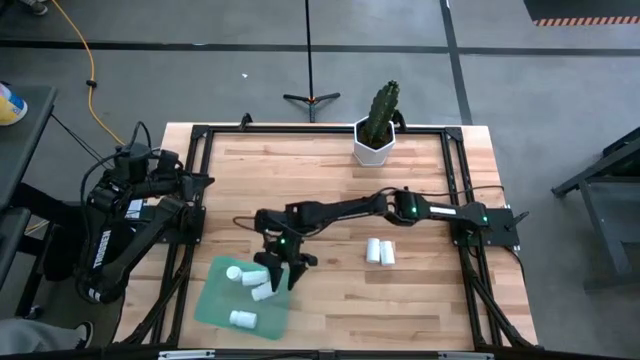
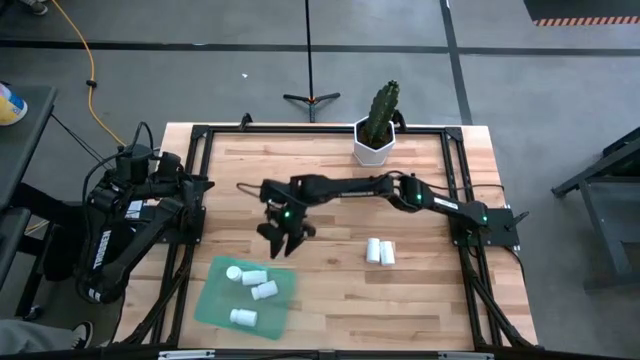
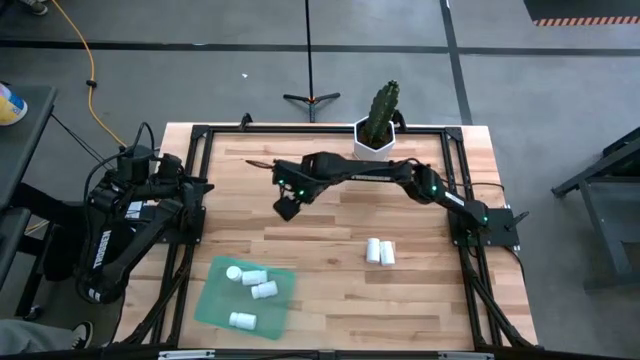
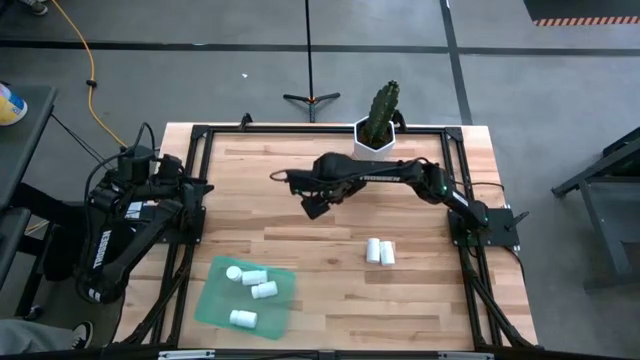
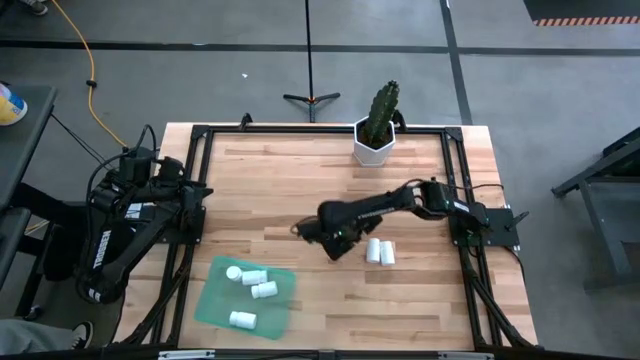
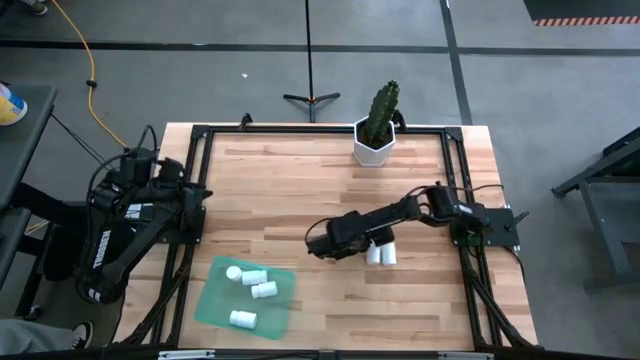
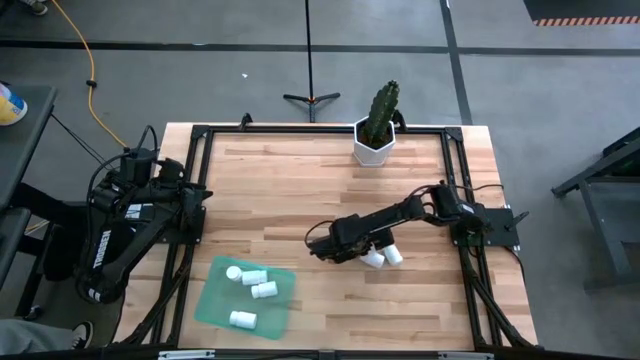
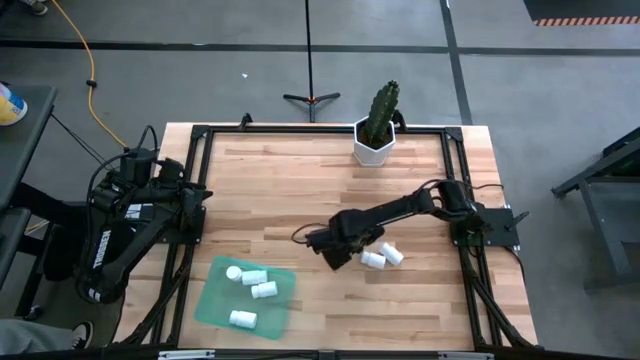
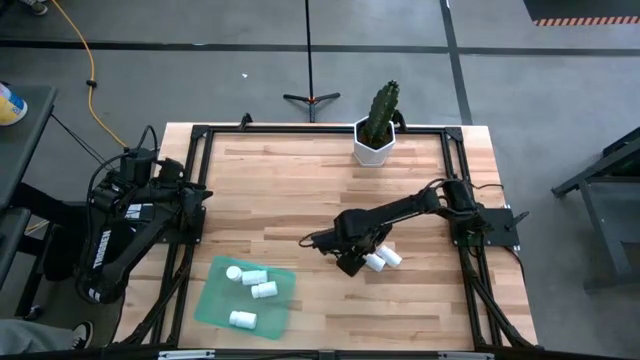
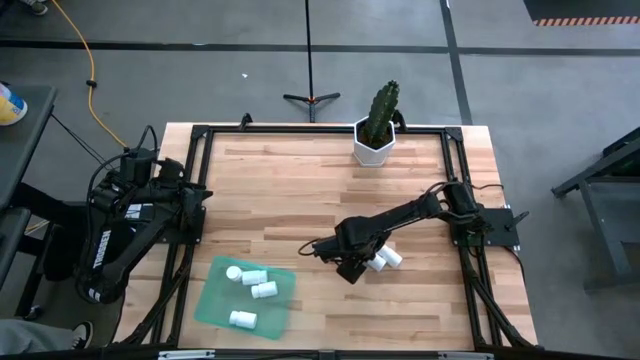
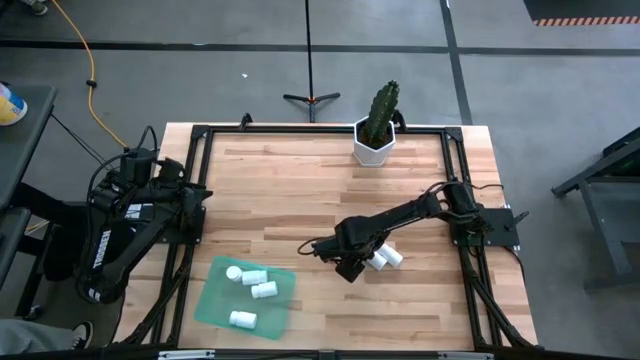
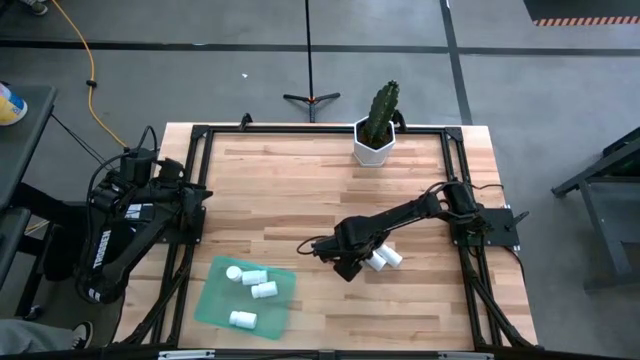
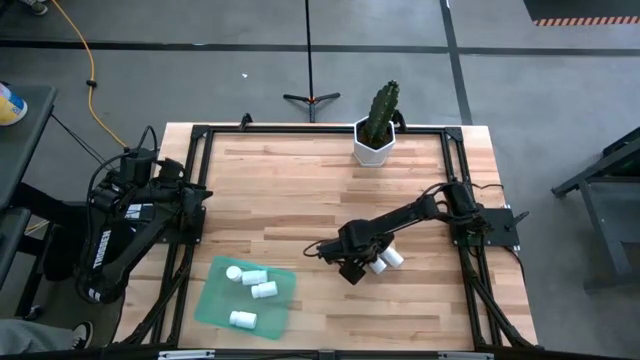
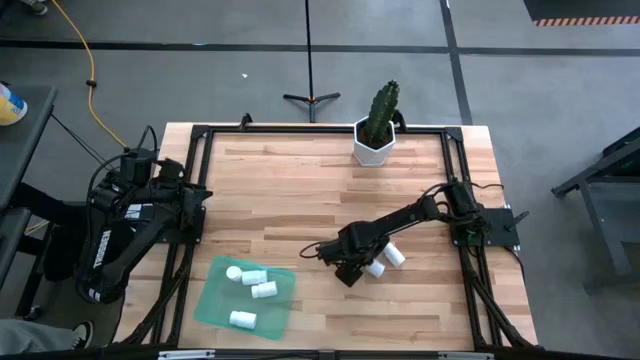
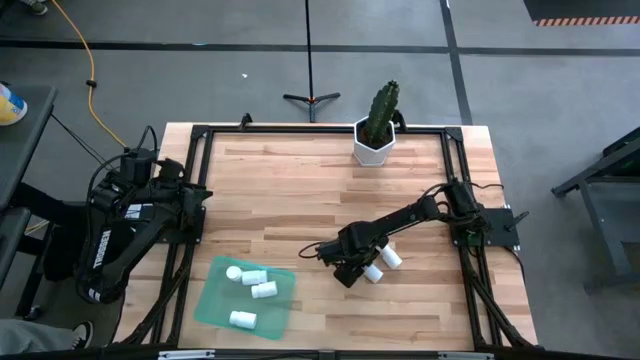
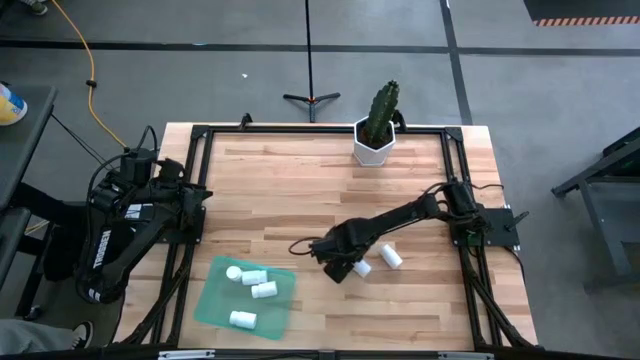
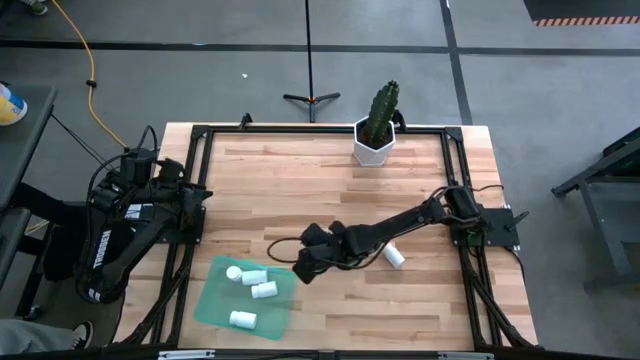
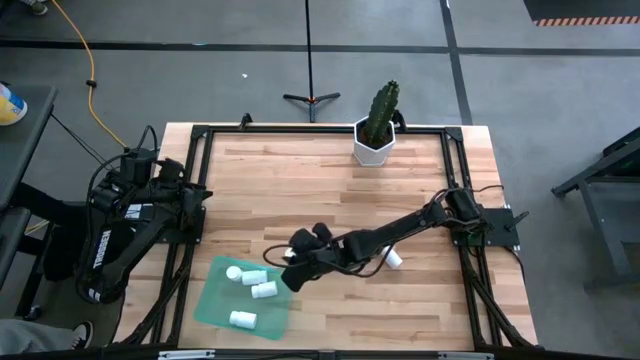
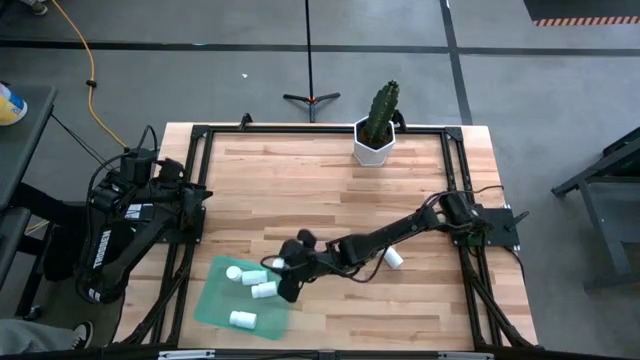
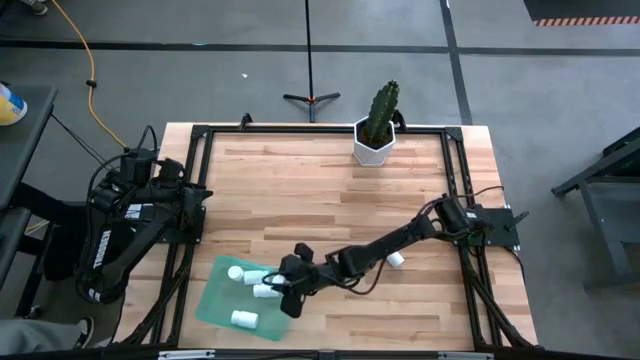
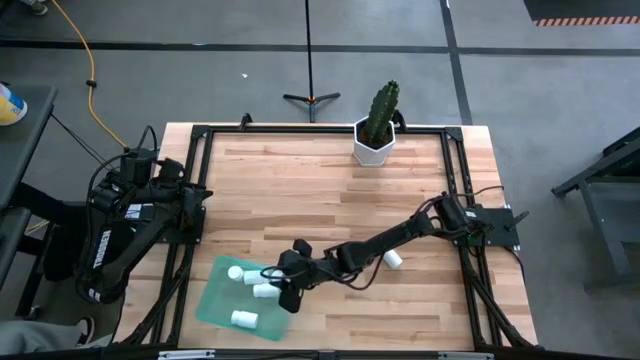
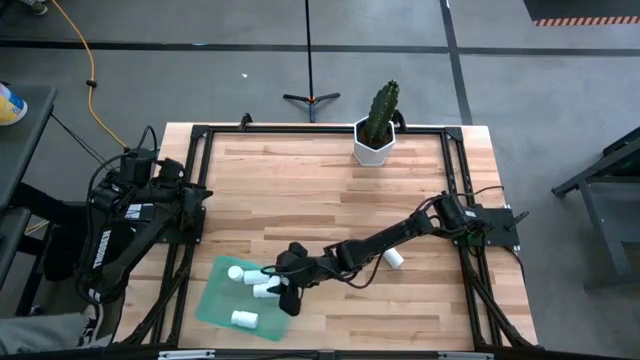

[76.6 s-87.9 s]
Task: Pick and place pill bottles into a basket
Put the white pill bottle into the green bin

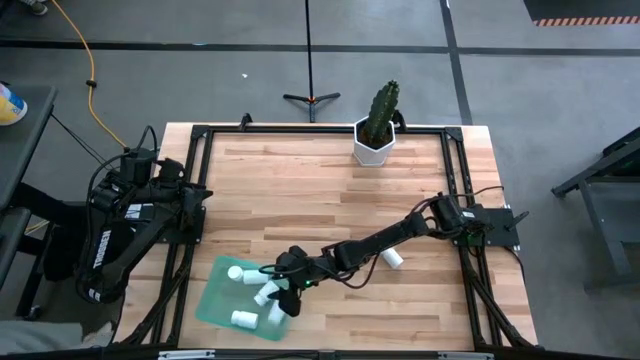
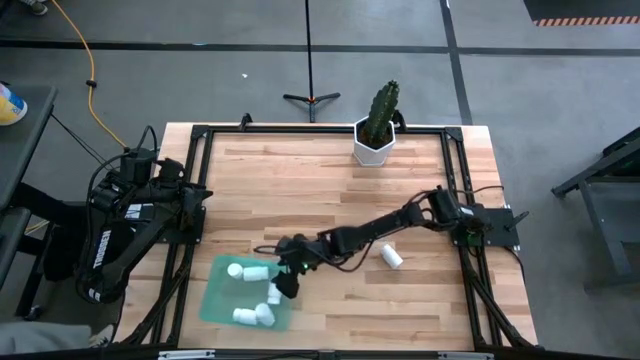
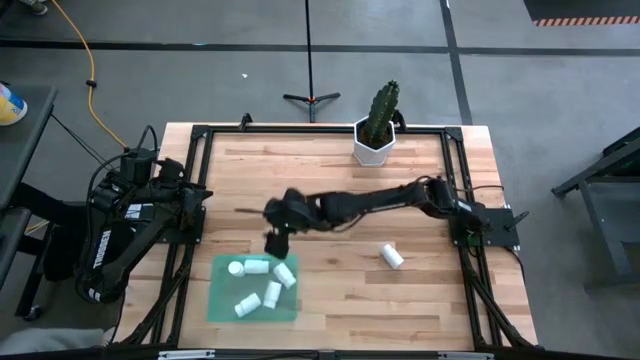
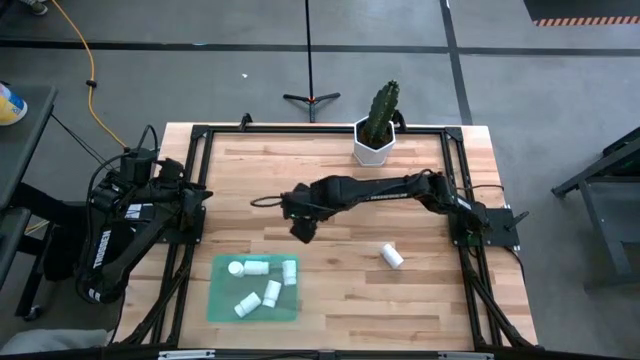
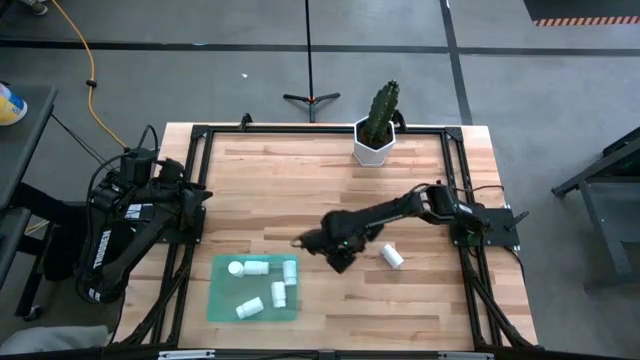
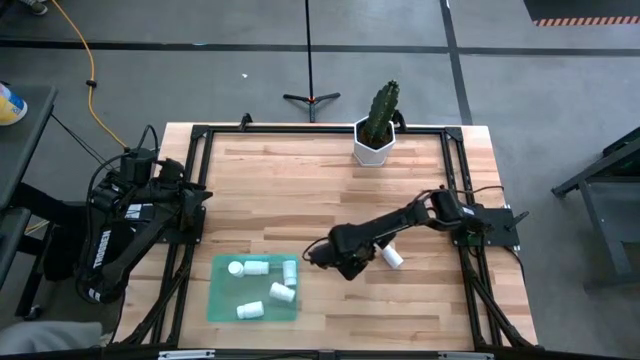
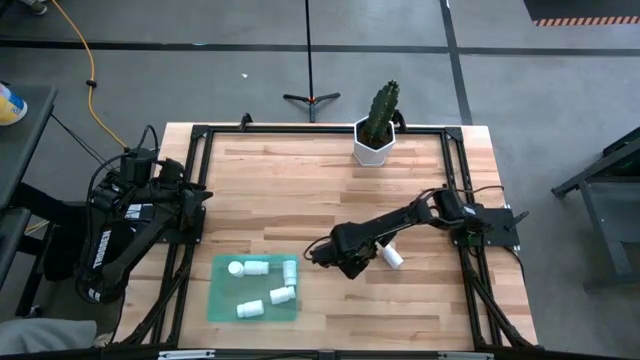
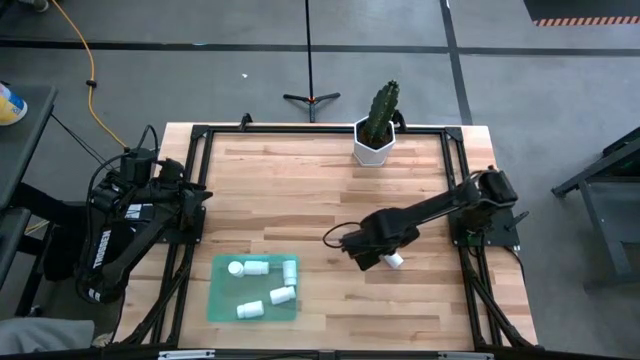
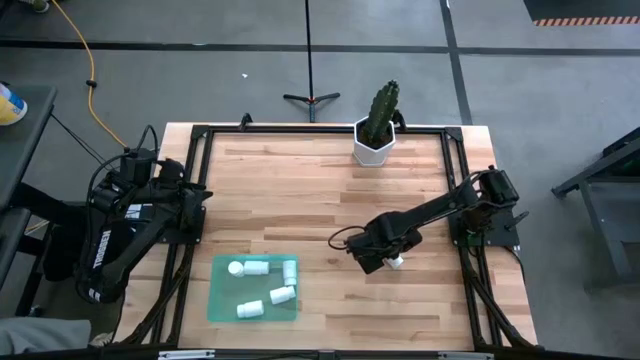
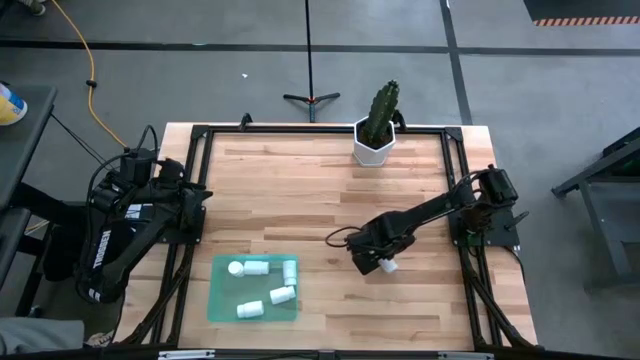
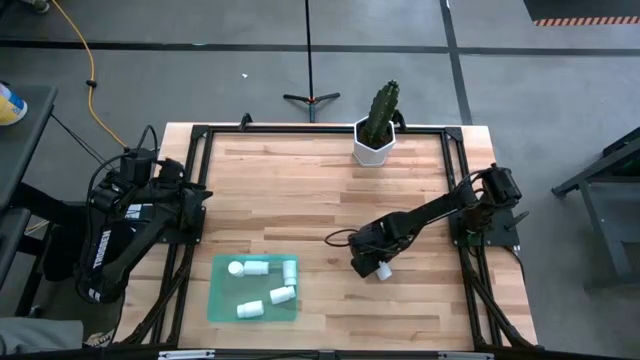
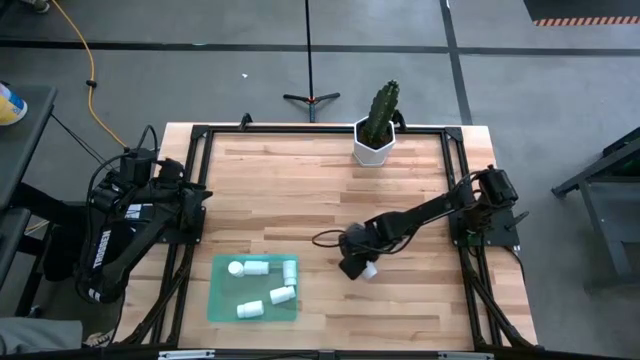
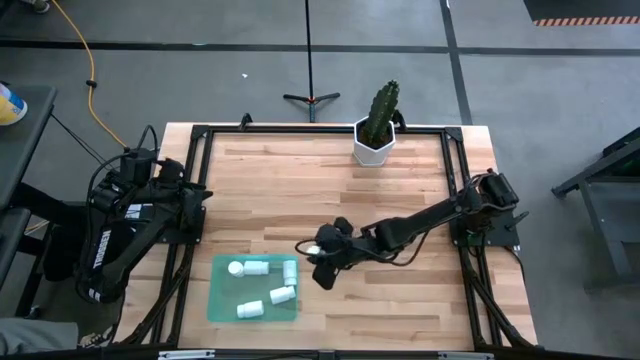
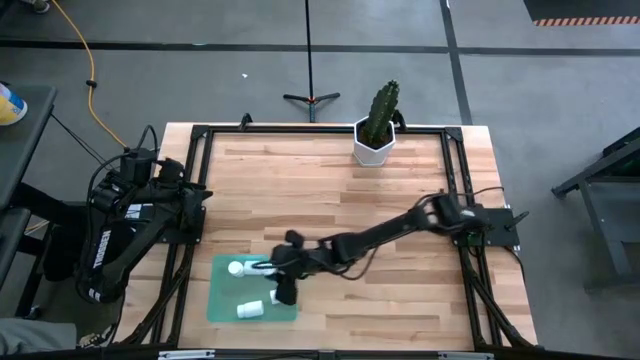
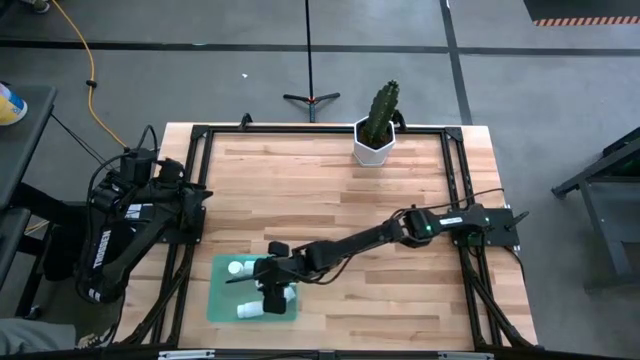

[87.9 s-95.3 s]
Put the white pill bottle into the green bin

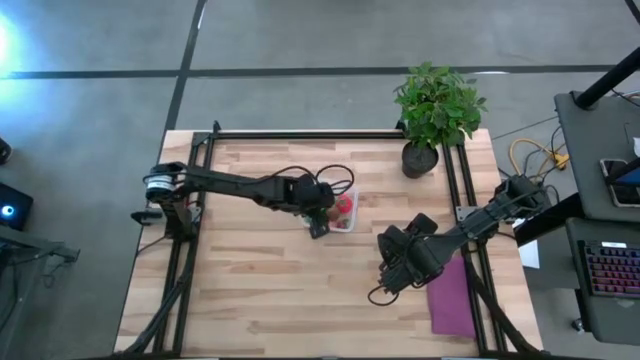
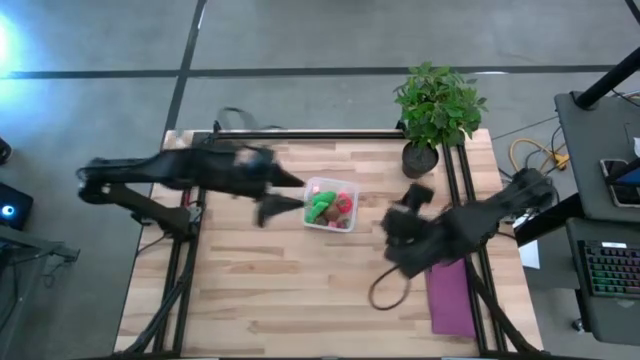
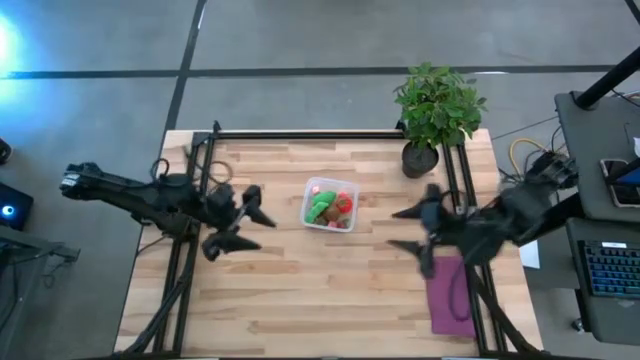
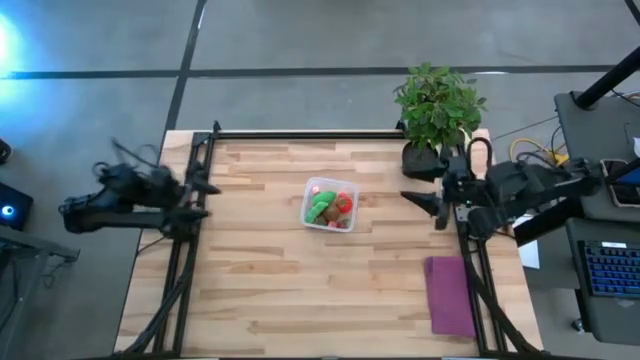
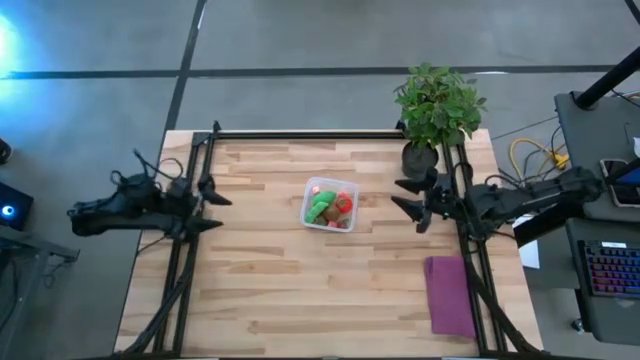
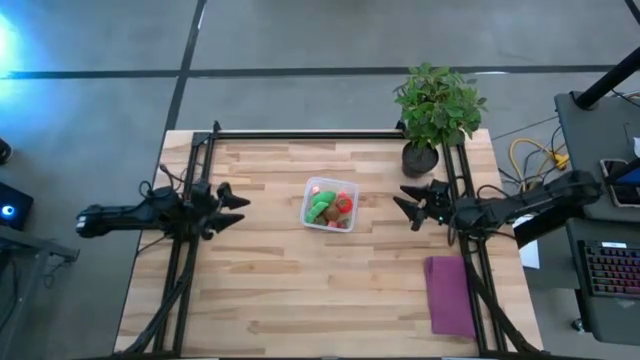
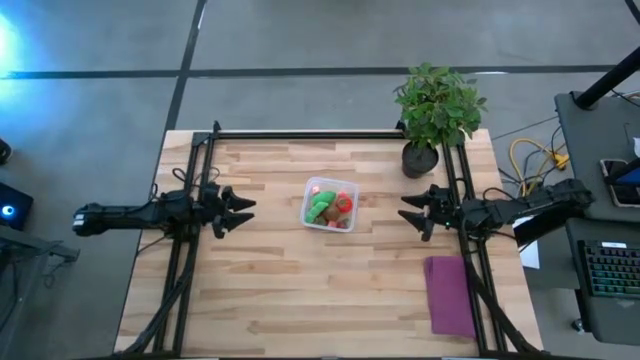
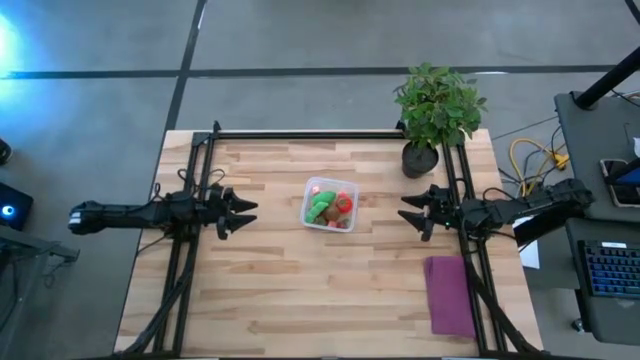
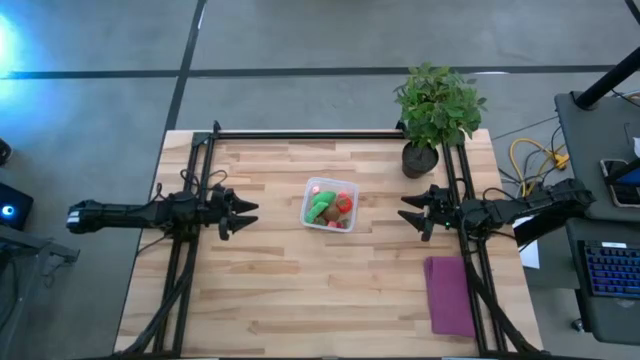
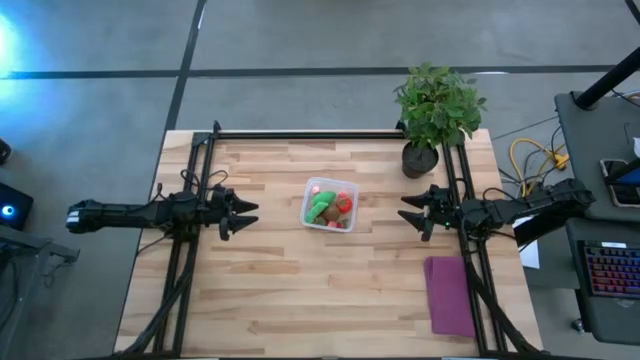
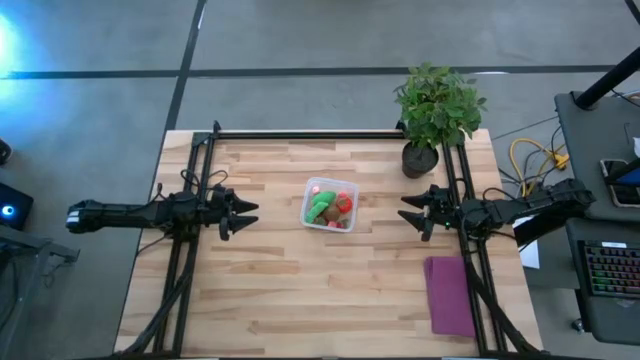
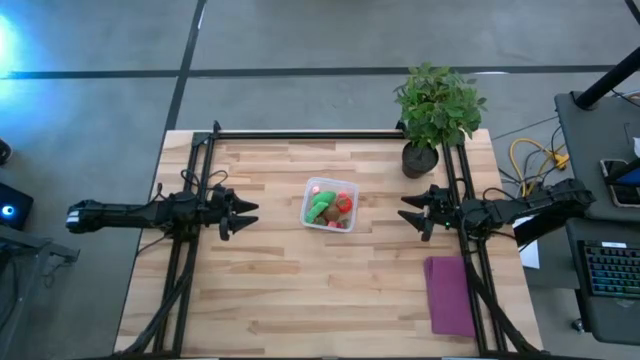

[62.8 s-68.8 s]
Task: Pick and placing Produce into tupperware
Return to Home Position
